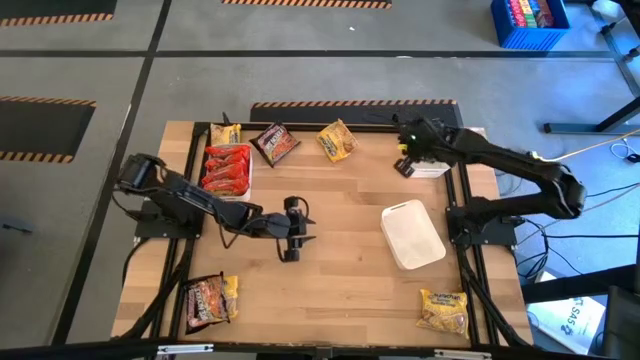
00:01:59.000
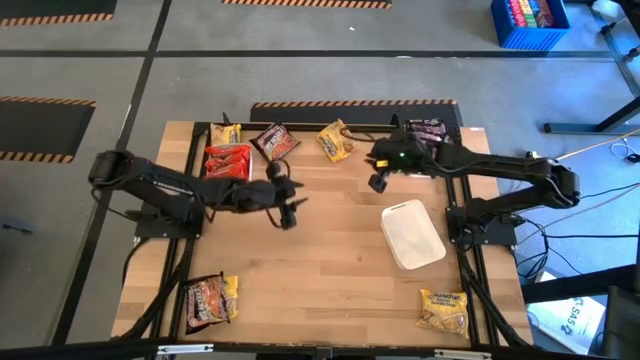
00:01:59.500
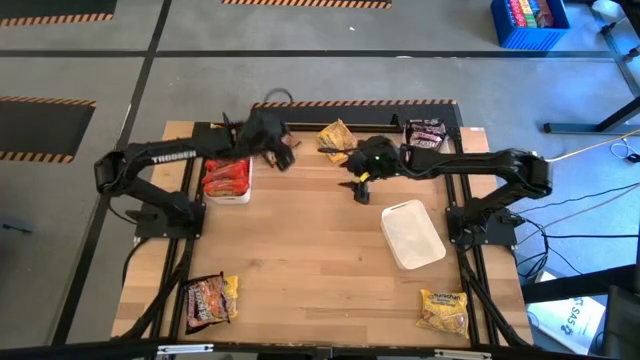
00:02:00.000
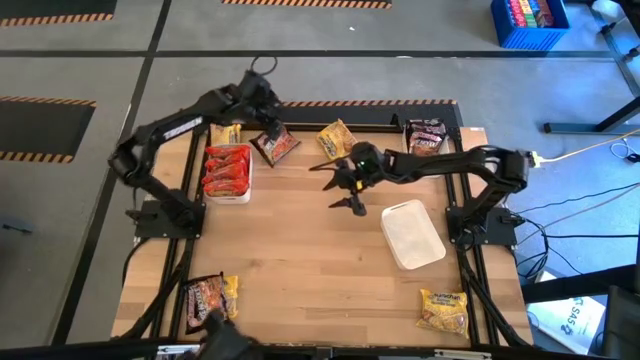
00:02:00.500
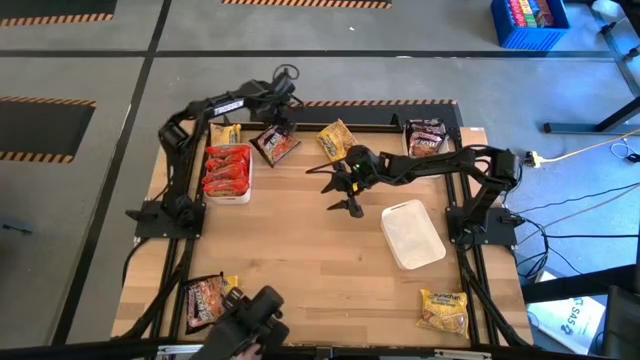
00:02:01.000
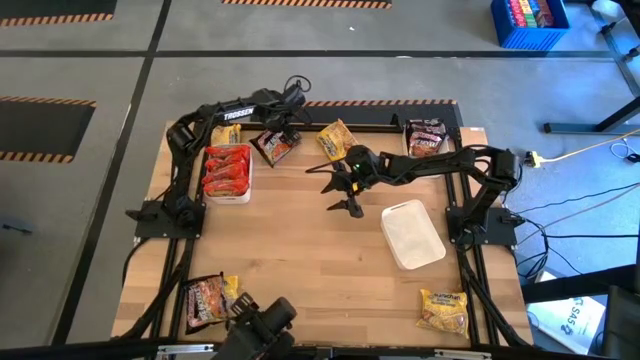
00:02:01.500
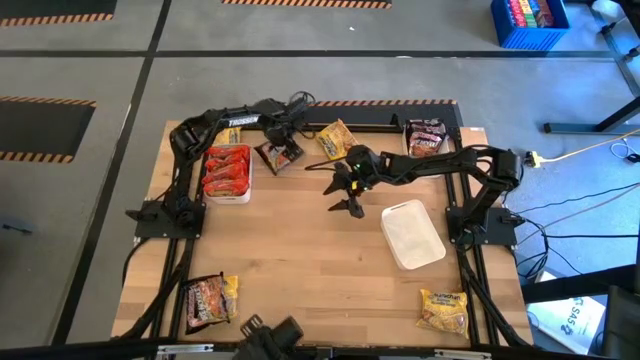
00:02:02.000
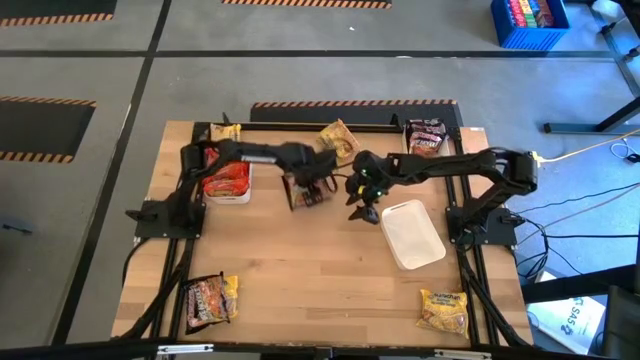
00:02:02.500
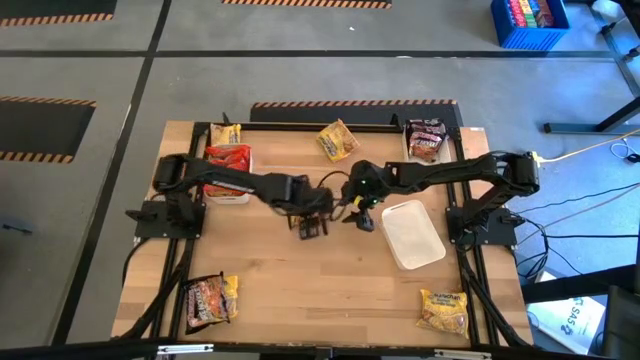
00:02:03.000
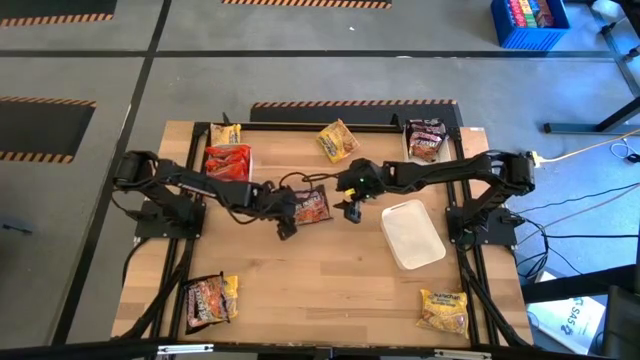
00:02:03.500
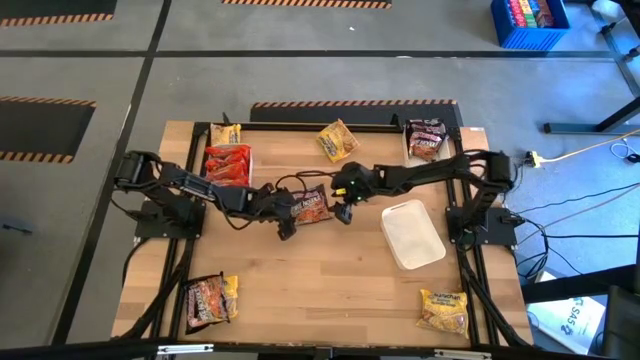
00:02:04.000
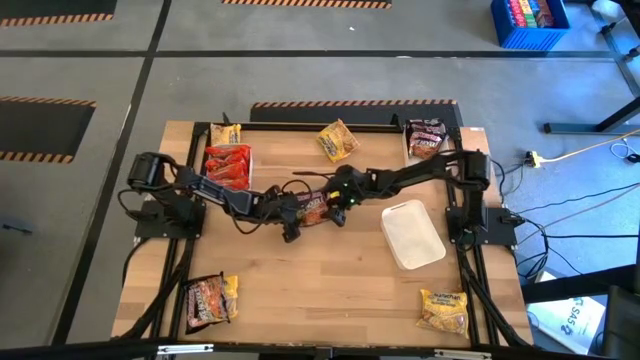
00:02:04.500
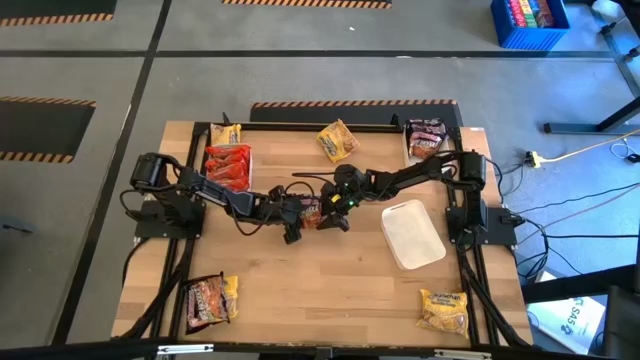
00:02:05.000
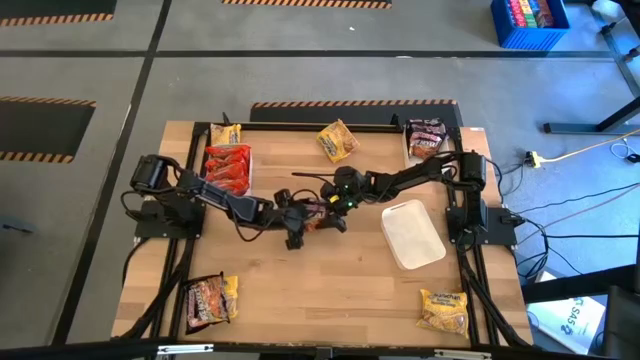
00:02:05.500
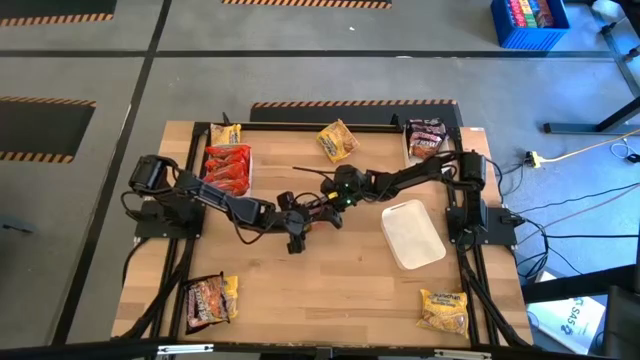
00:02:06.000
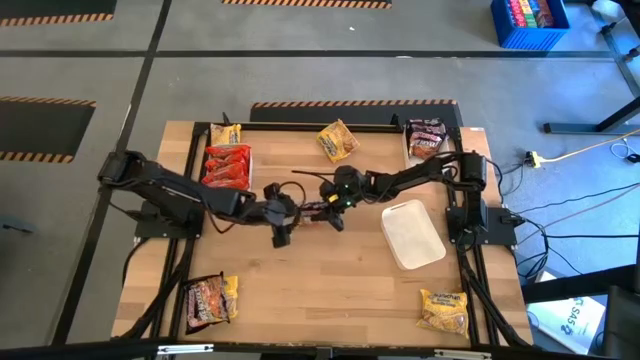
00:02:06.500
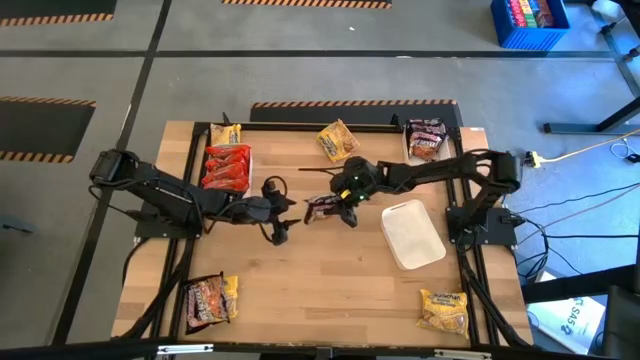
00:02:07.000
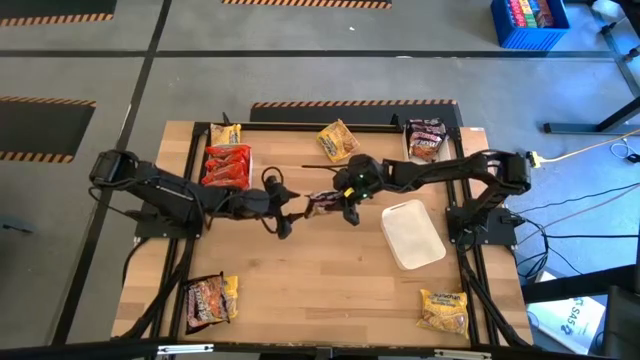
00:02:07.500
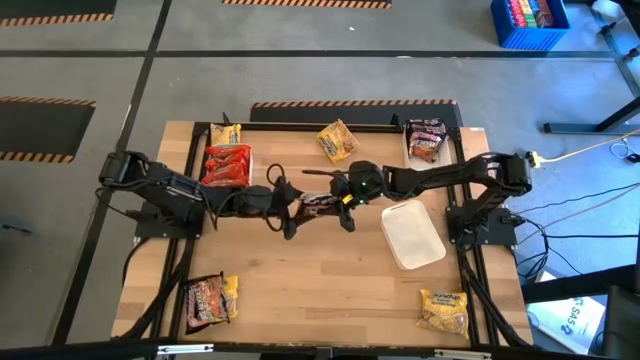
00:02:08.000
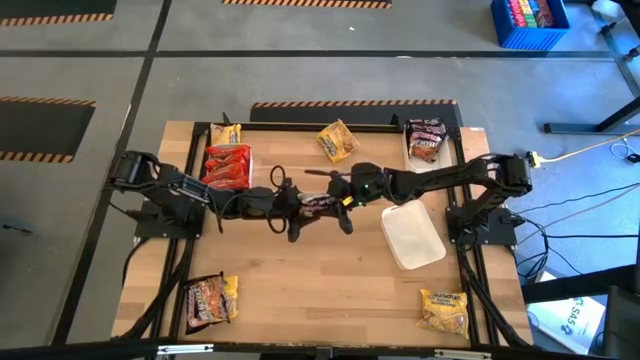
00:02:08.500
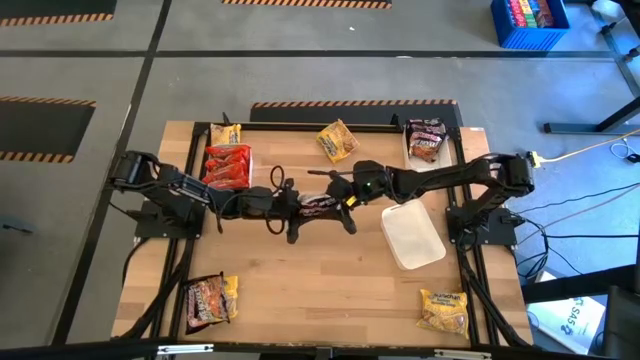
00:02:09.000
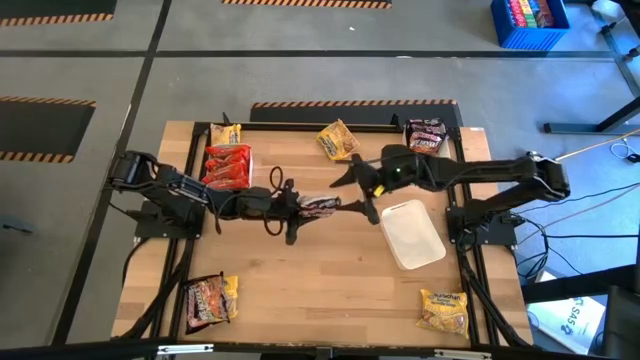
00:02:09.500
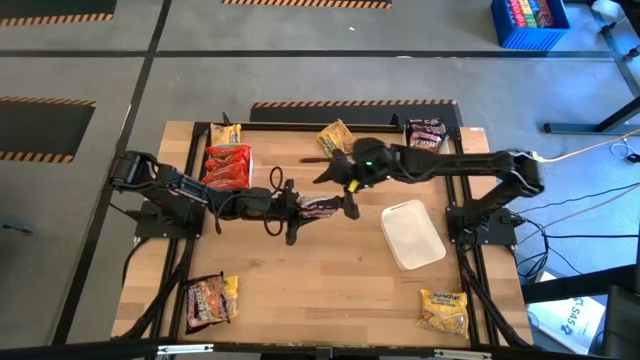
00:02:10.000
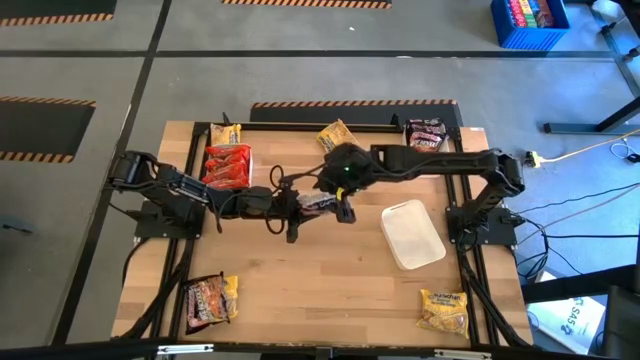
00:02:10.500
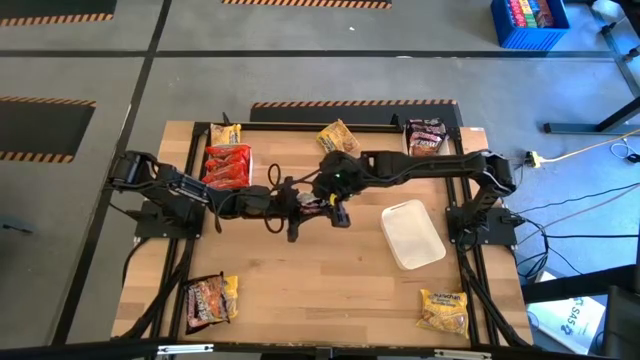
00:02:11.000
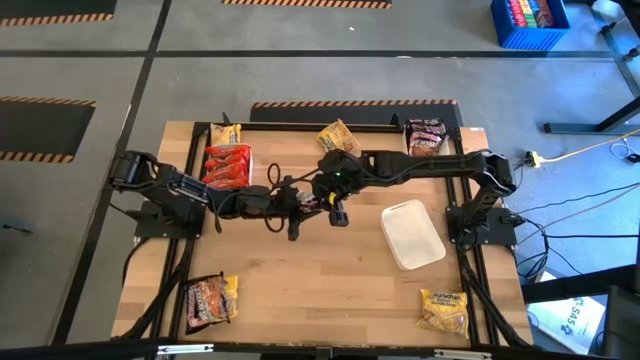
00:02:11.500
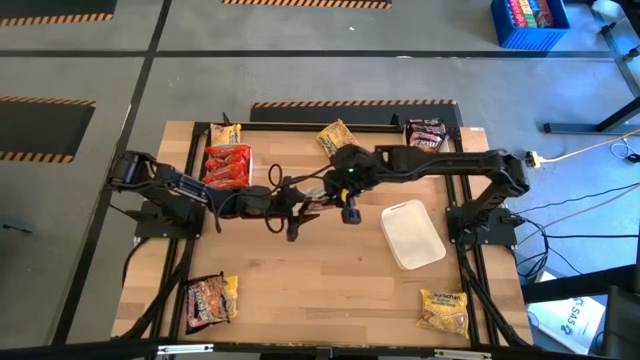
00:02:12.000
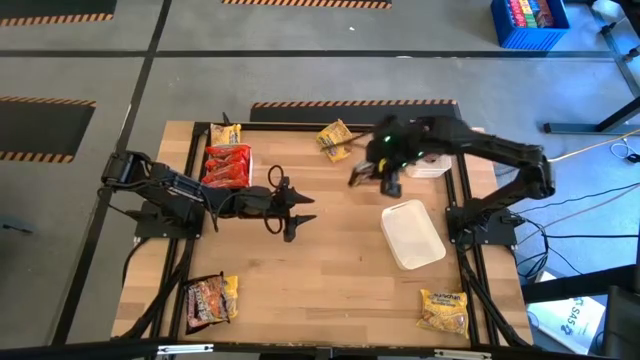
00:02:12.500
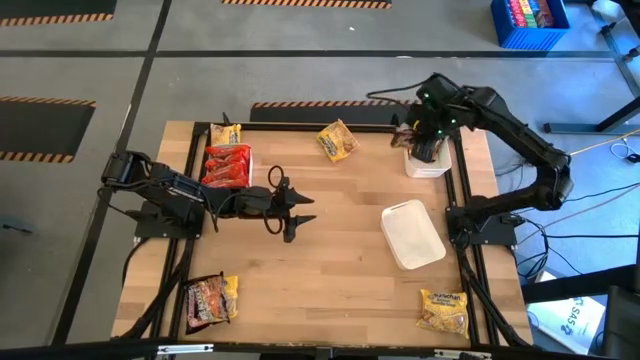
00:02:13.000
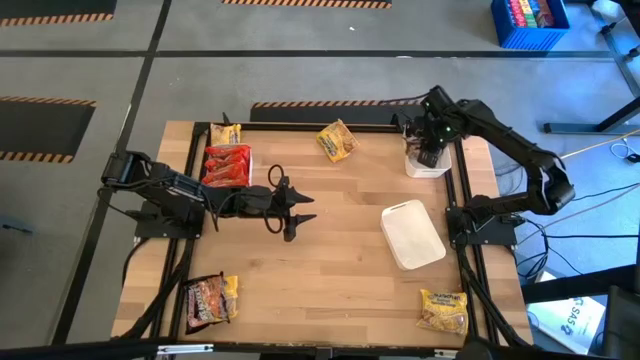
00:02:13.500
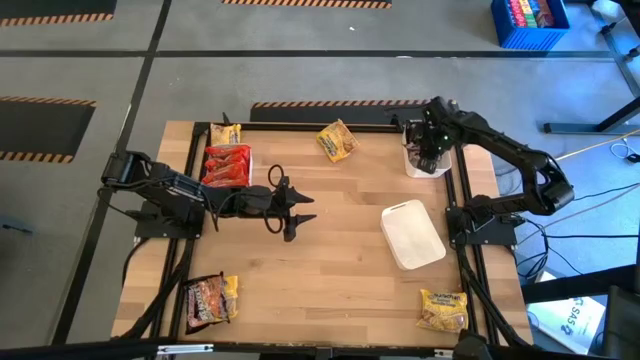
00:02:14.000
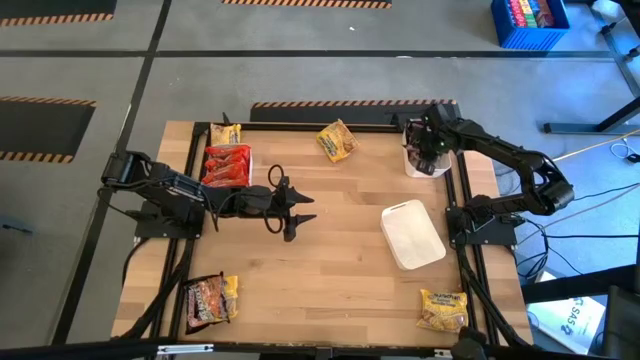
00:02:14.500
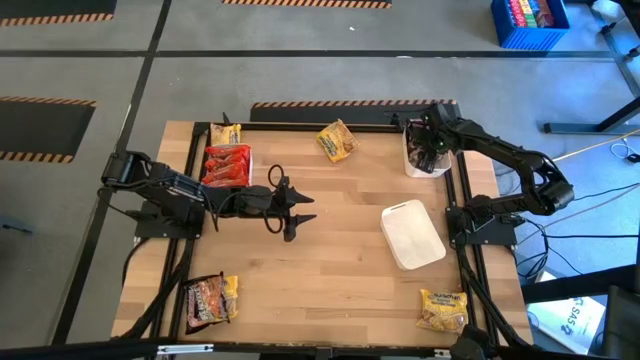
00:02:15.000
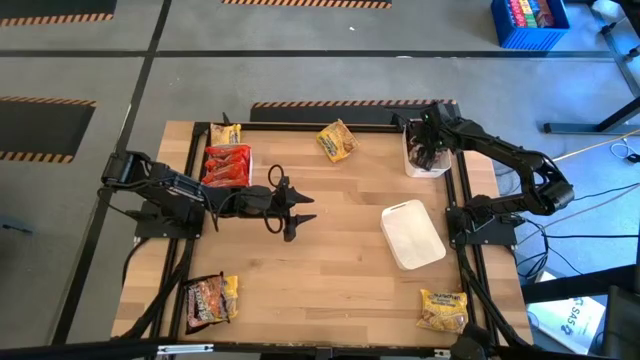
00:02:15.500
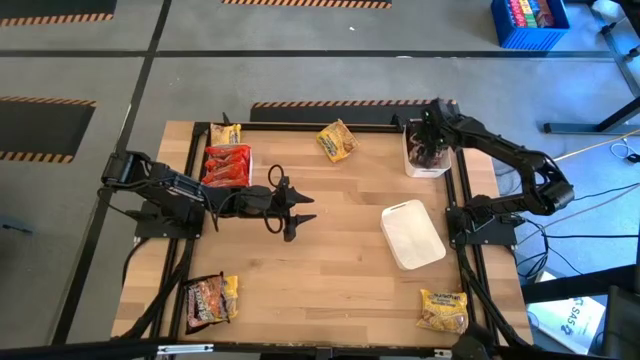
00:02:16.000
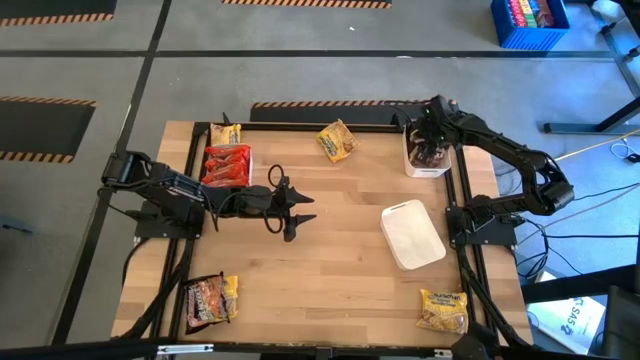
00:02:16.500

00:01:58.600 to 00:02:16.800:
Task: Sort Maruchan noodles
Put the top black noodle into the top right white bin

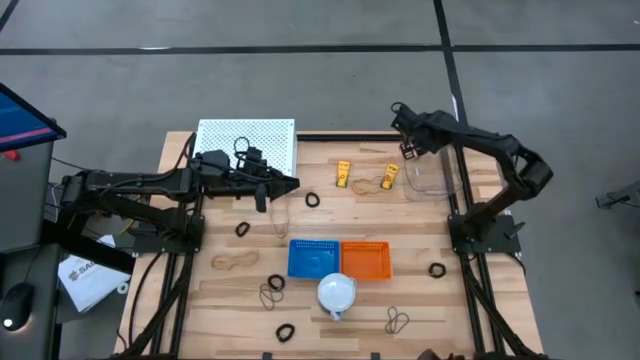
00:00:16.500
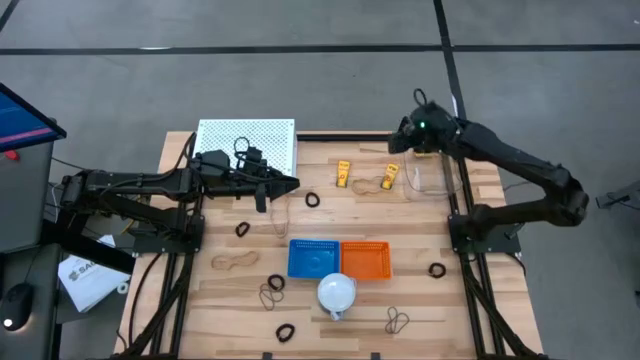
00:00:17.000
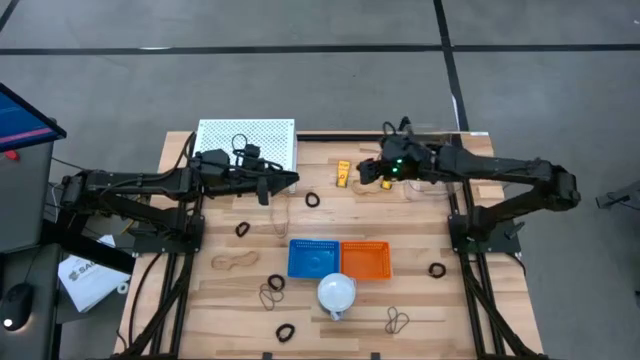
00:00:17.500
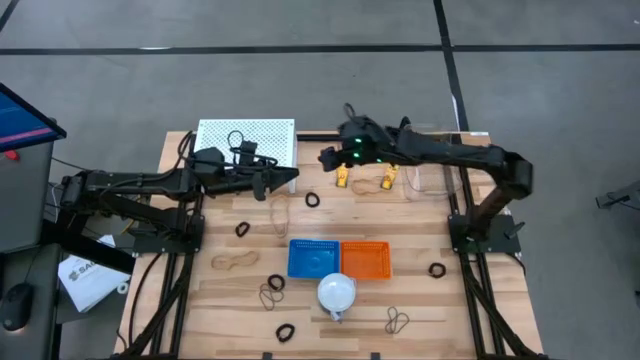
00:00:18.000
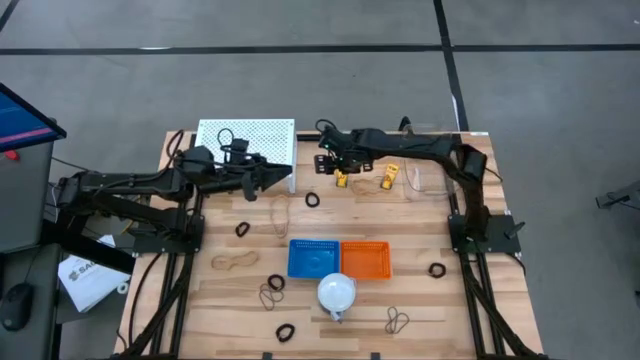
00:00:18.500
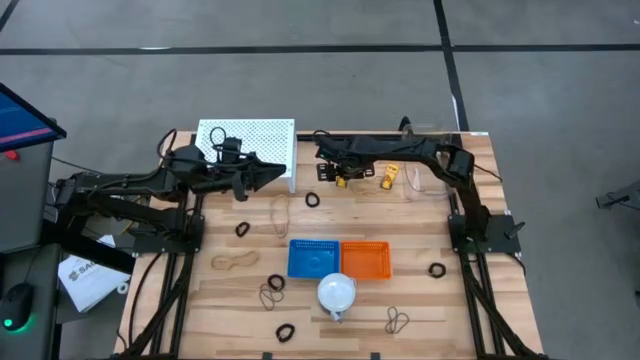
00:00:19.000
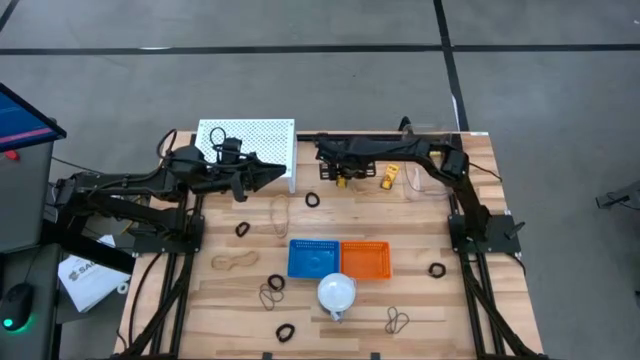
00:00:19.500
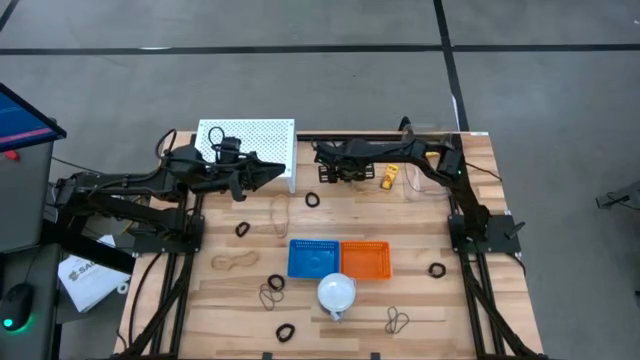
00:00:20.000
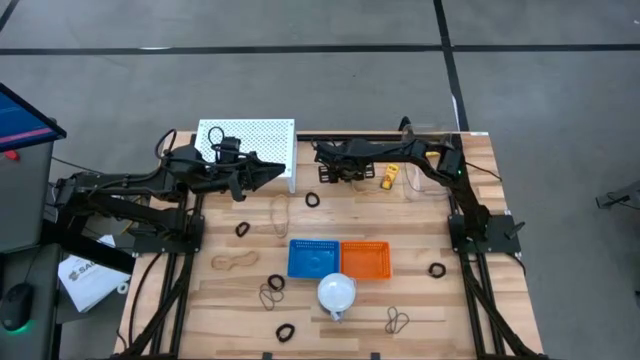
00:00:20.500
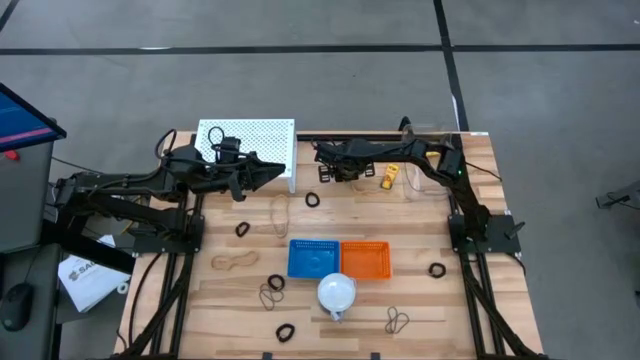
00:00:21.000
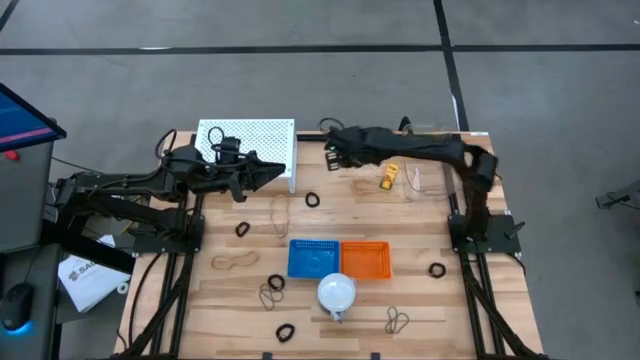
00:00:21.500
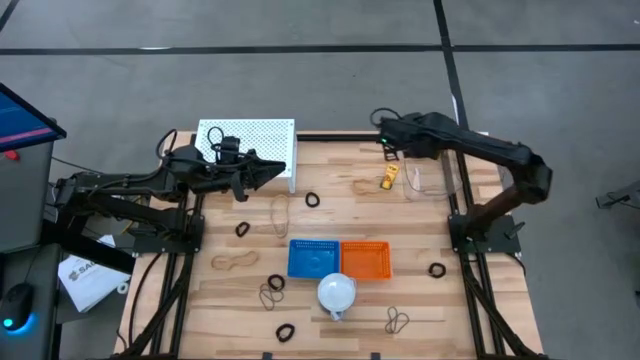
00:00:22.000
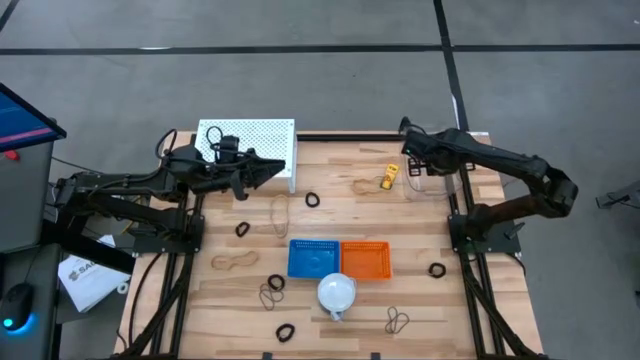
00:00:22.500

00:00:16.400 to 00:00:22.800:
Task: Pick & Place Office Desk Supplies
Put the left yellow crayon box into the transparent bin
